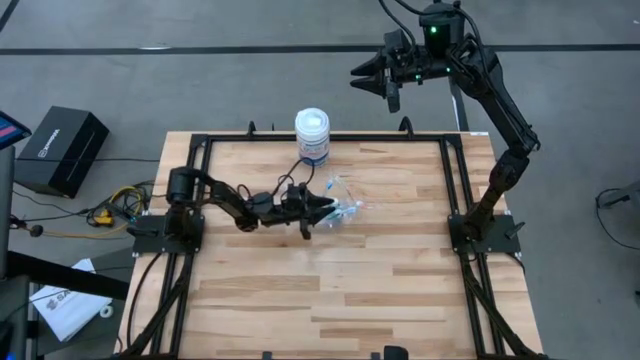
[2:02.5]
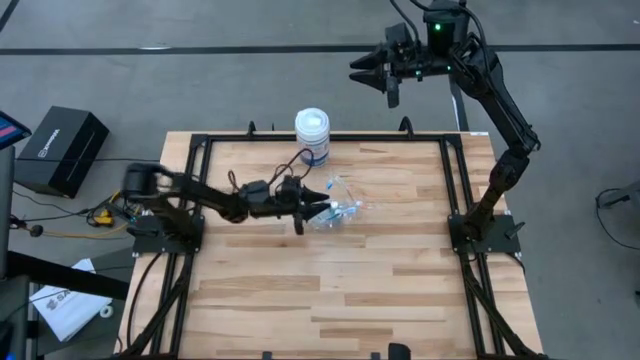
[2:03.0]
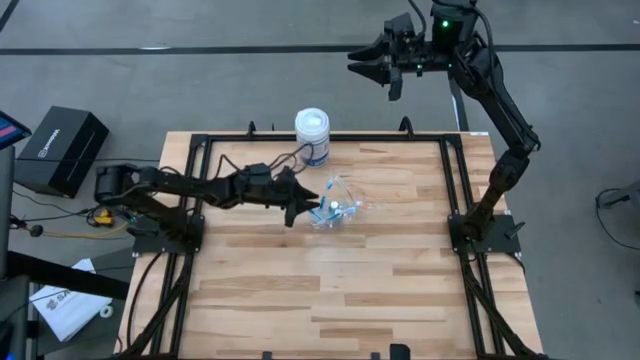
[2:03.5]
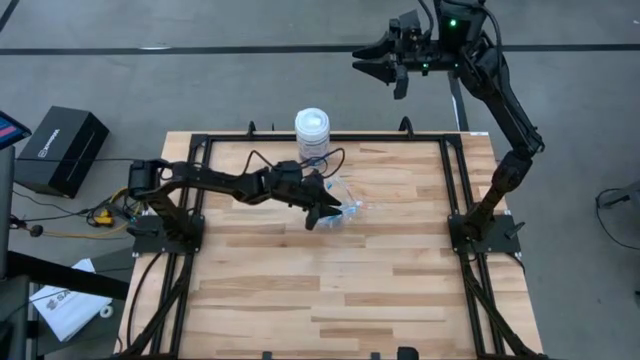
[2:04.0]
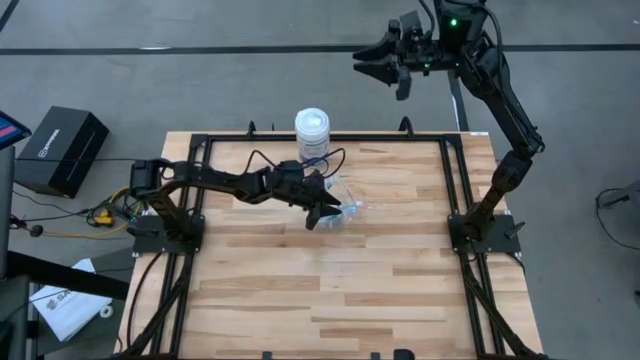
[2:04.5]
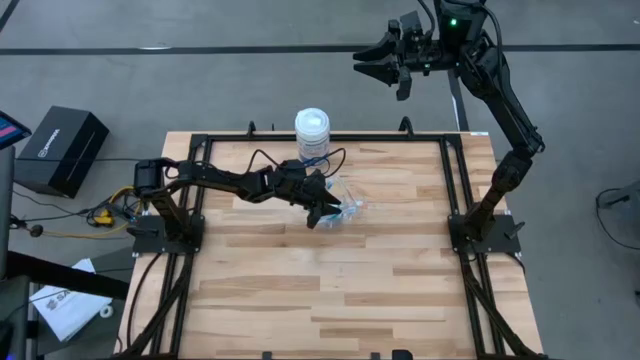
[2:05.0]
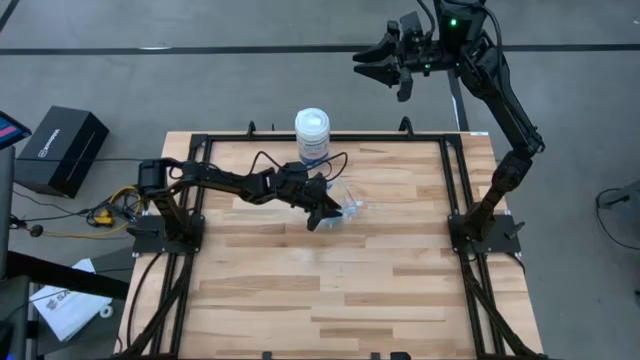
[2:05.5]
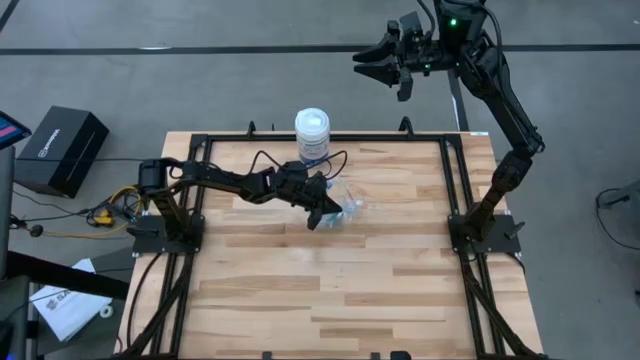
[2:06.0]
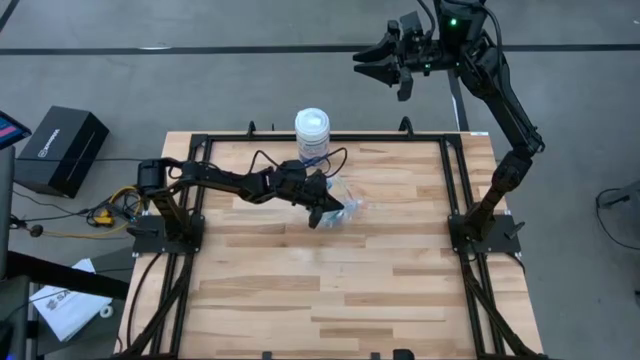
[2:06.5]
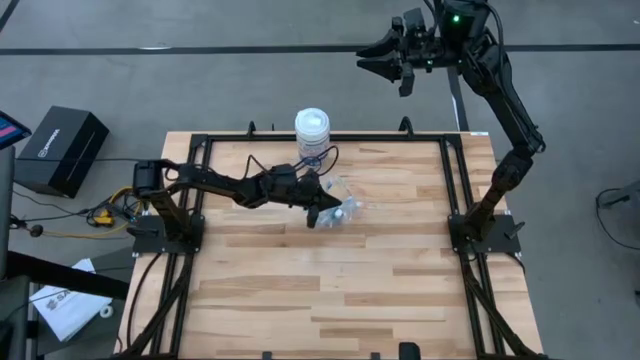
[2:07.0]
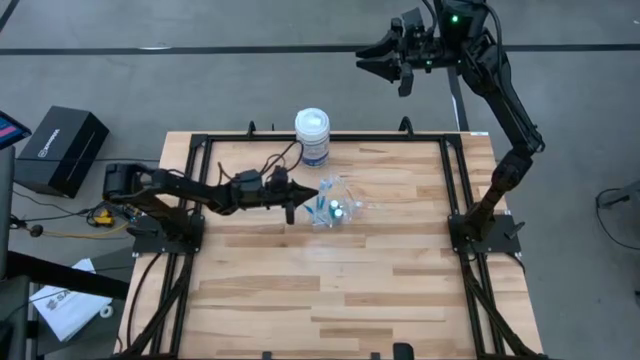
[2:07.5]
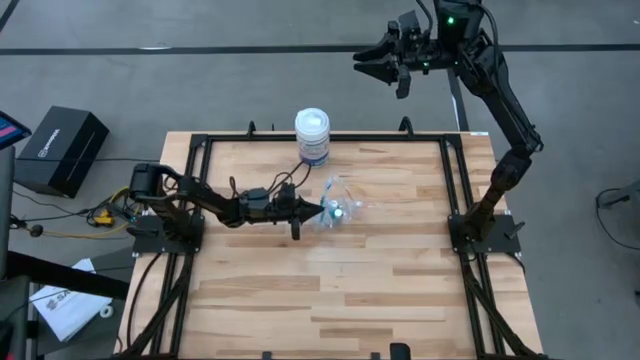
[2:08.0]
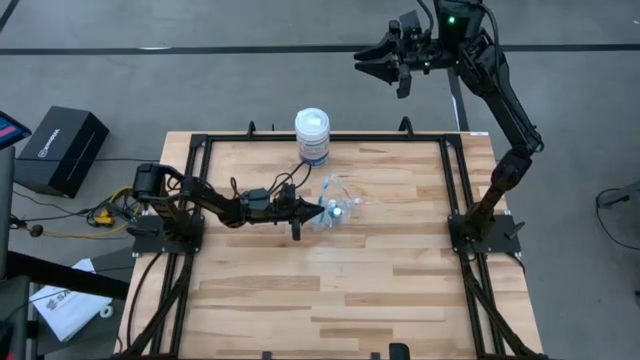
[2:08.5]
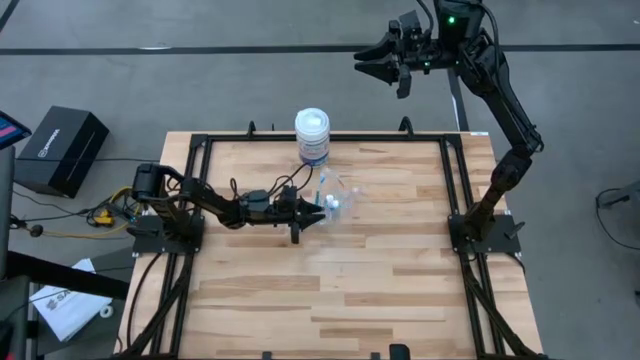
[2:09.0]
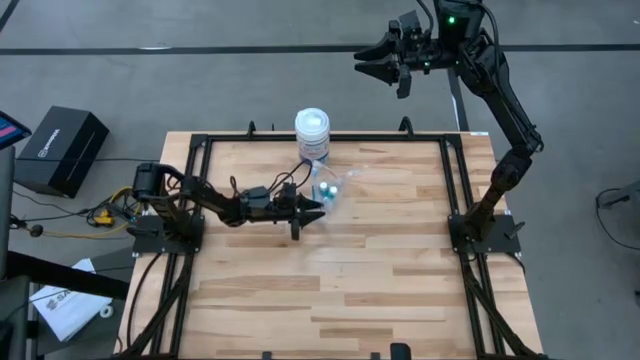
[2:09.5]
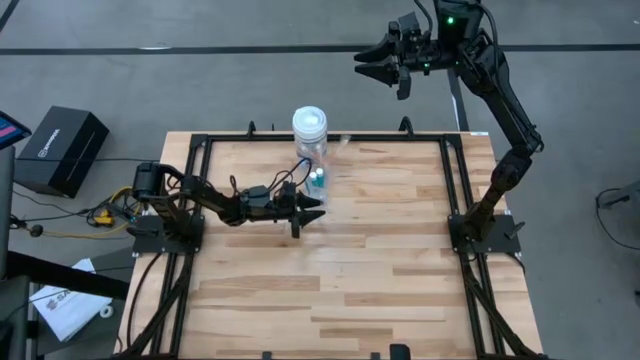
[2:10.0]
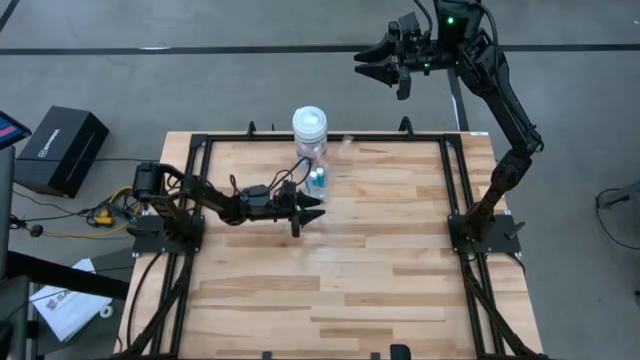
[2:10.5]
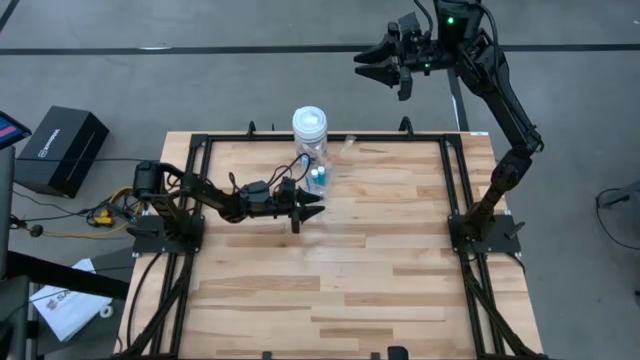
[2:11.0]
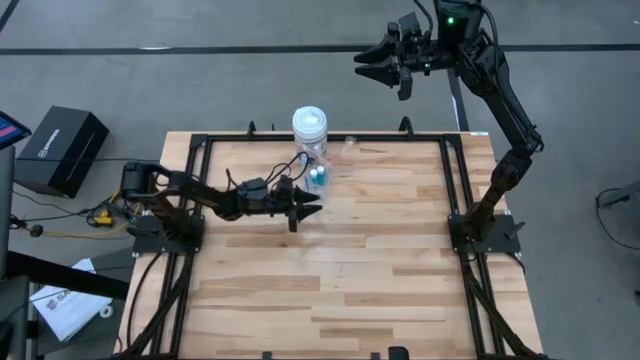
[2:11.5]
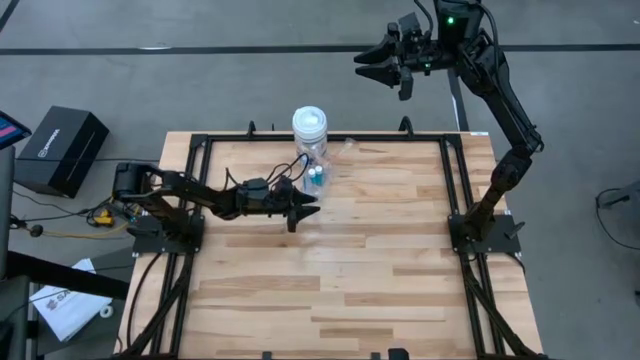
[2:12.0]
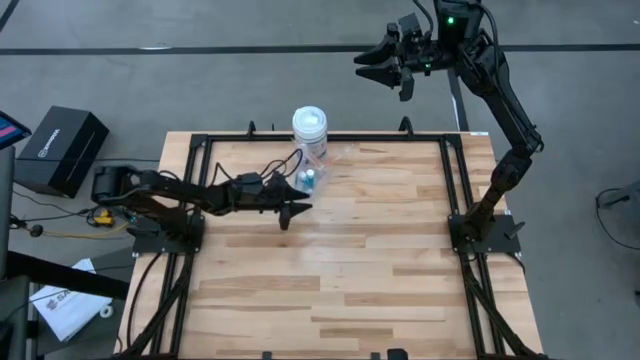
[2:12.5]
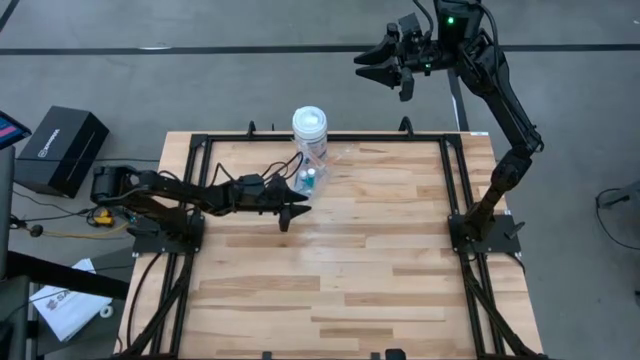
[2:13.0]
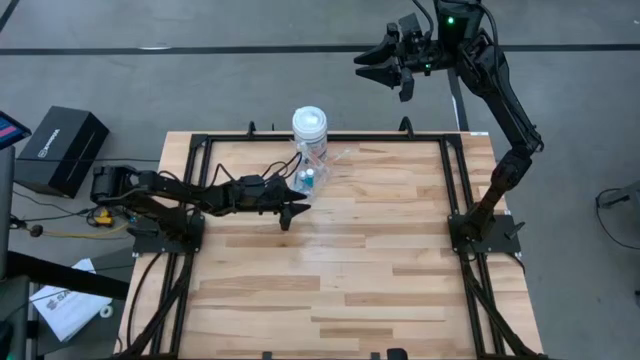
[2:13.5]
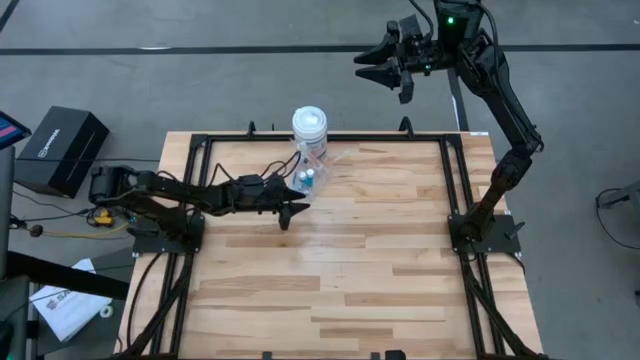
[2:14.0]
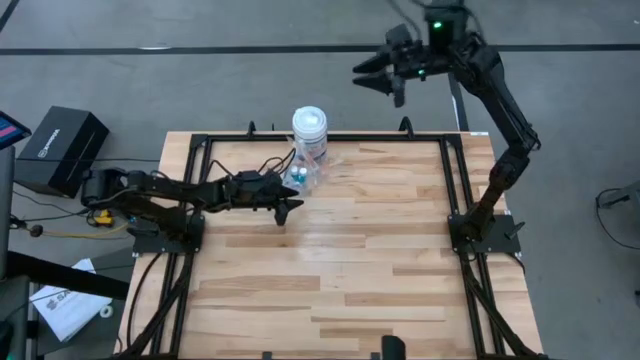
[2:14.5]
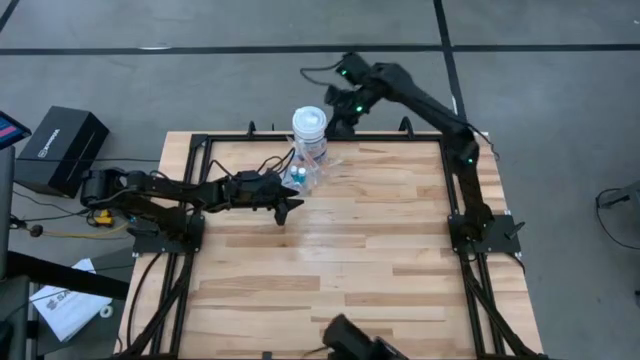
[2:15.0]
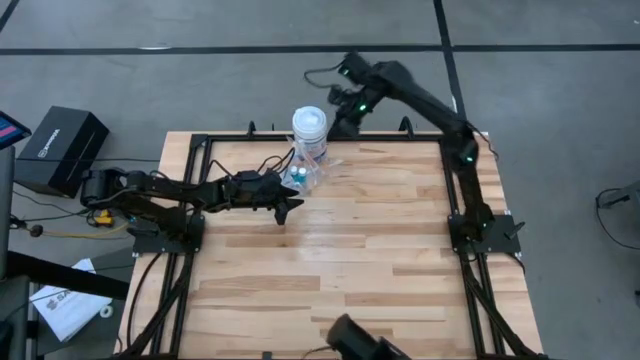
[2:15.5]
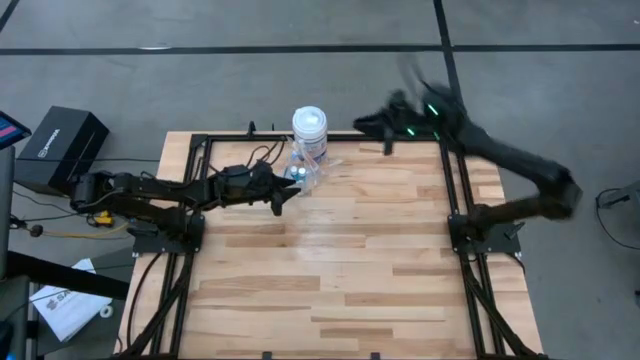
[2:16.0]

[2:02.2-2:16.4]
Task: Pick & Place toothbrushing station
Put the blue toothbrush into the transparent organizer

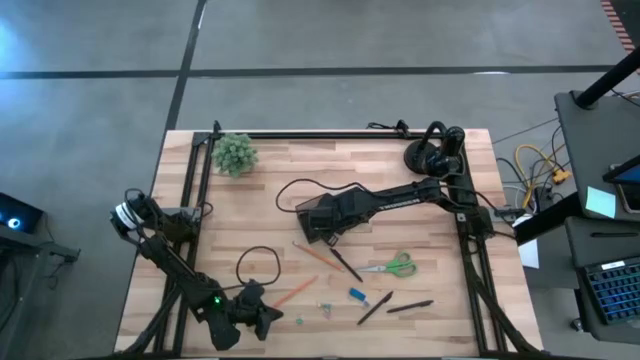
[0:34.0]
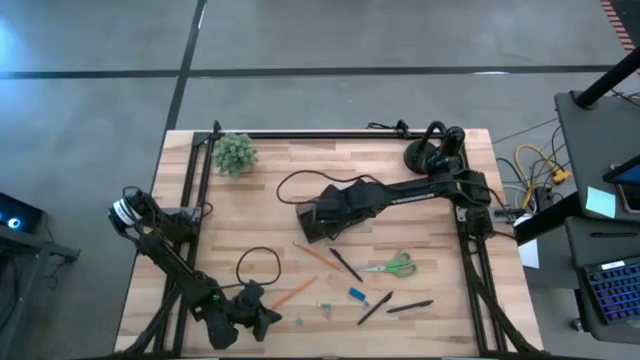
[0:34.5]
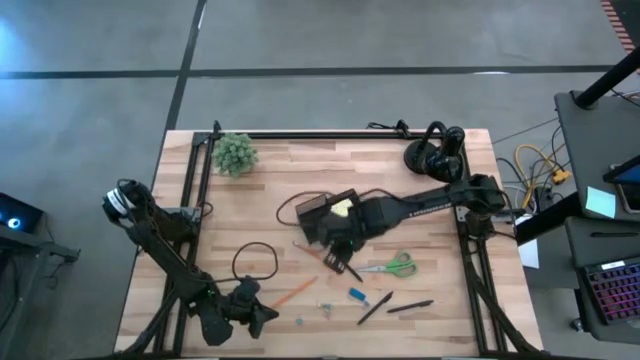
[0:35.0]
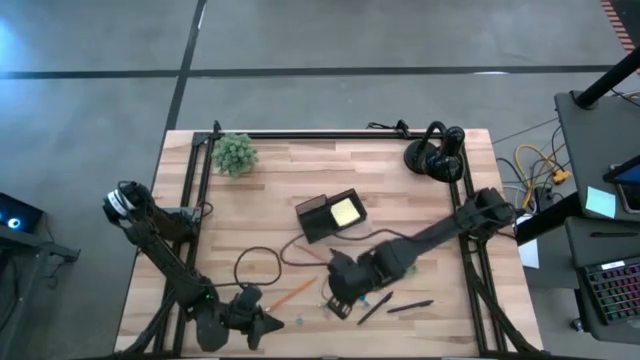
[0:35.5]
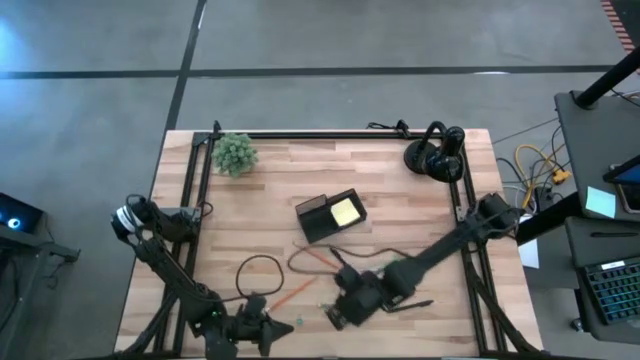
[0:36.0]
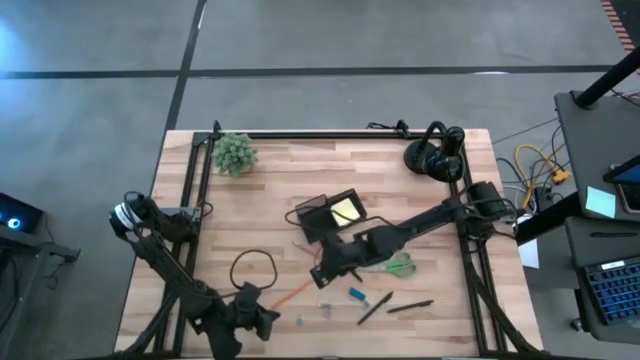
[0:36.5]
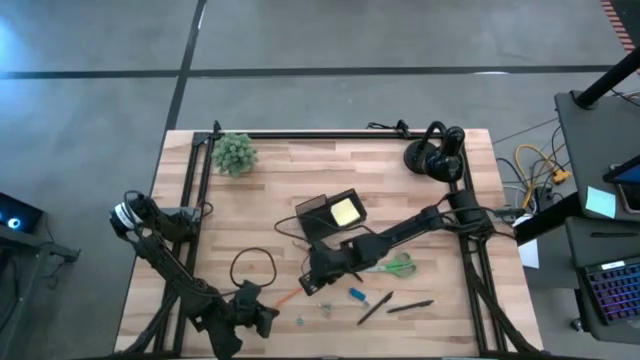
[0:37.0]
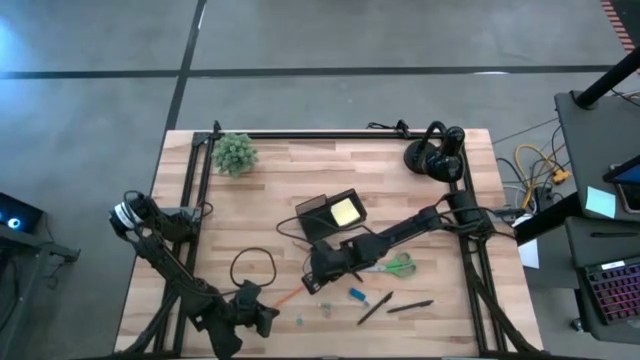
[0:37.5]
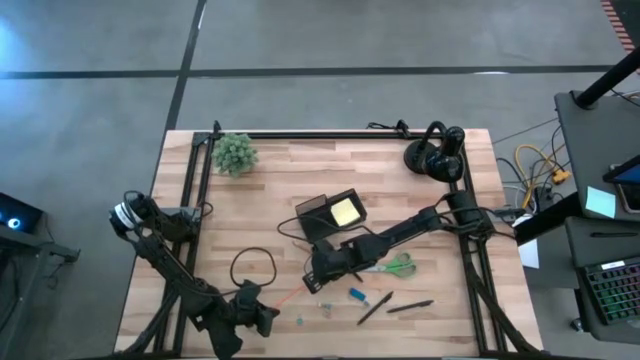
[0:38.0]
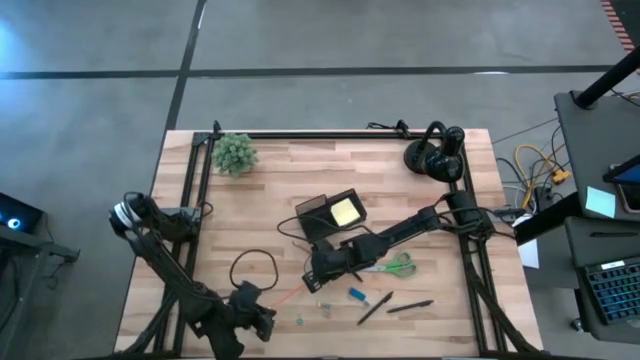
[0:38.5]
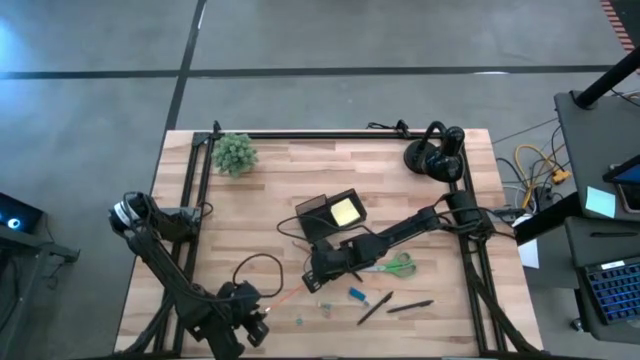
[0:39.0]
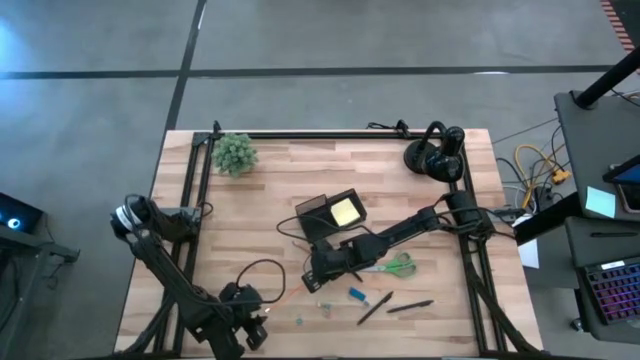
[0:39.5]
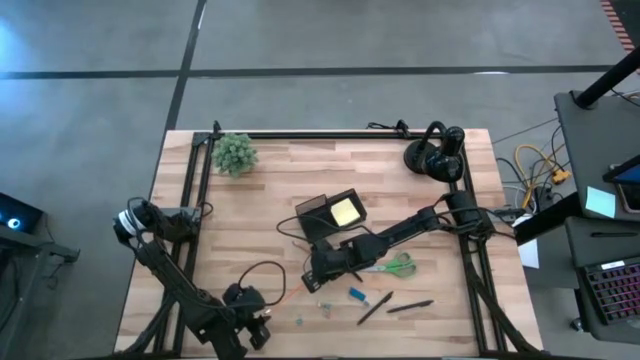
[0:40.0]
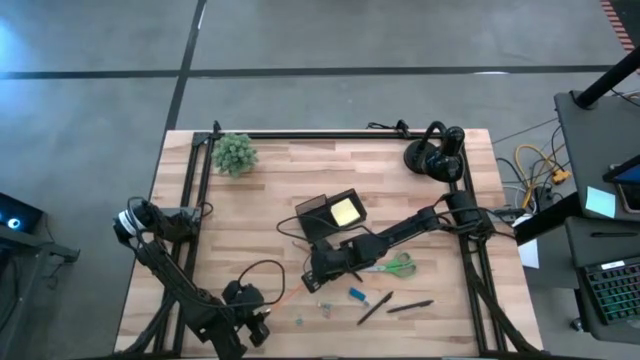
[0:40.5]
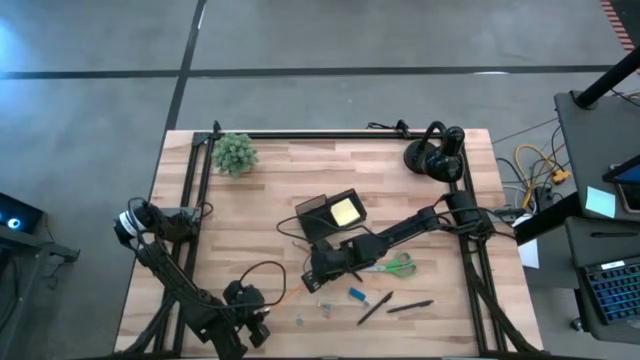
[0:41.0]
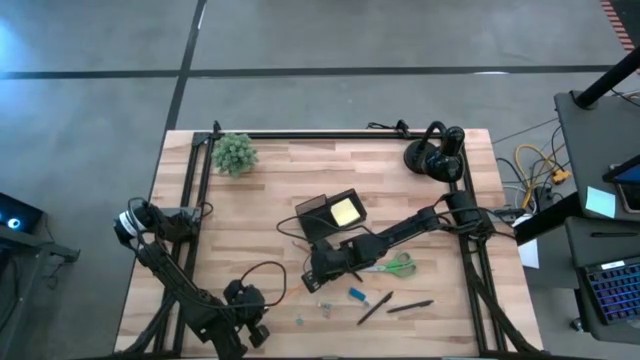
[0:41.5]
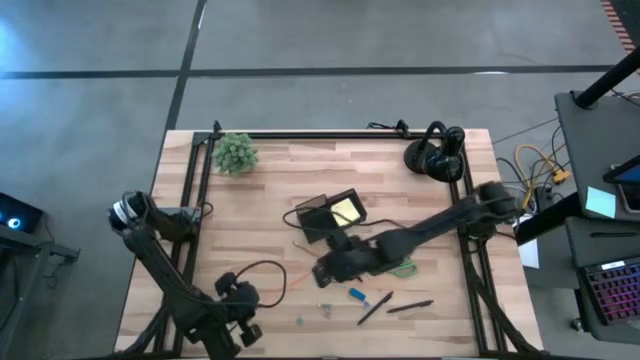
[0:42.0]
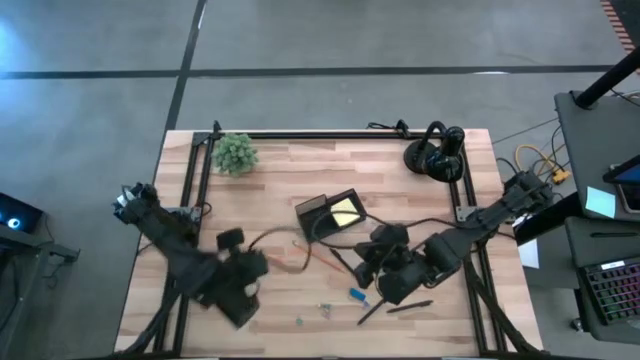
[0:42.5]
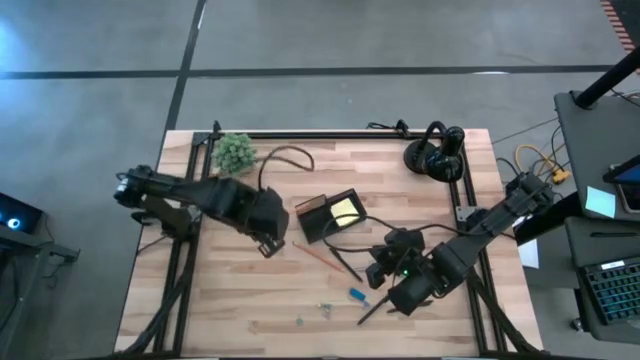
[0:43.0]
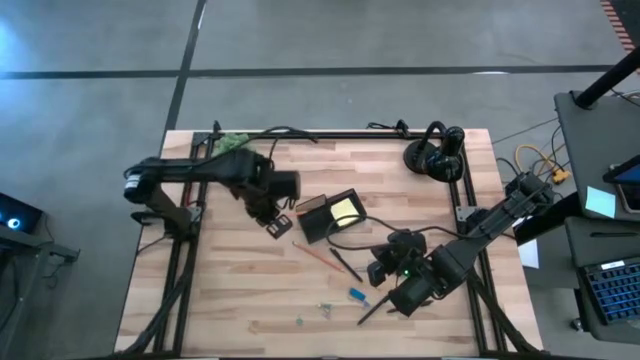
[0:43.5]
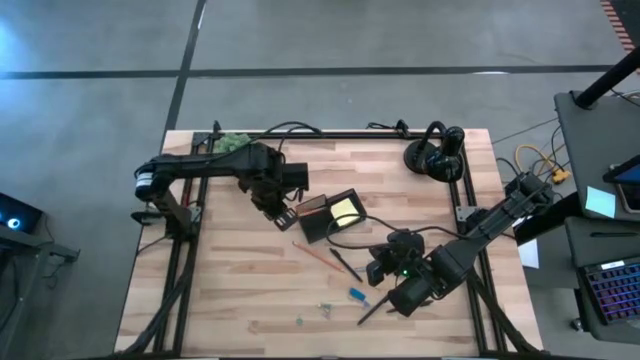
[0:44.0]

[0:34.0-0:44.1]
Task: Pick and place office supplies into organizer
Put the bottom orange pencil into the black desk organizer
